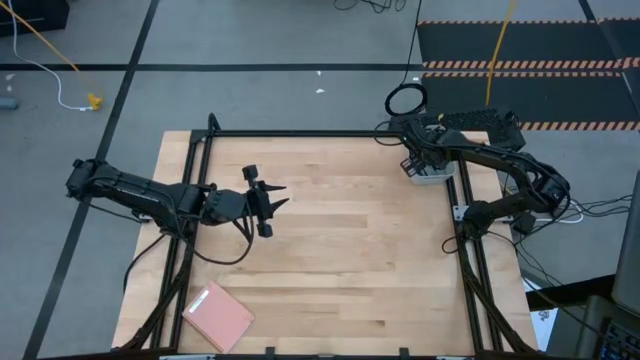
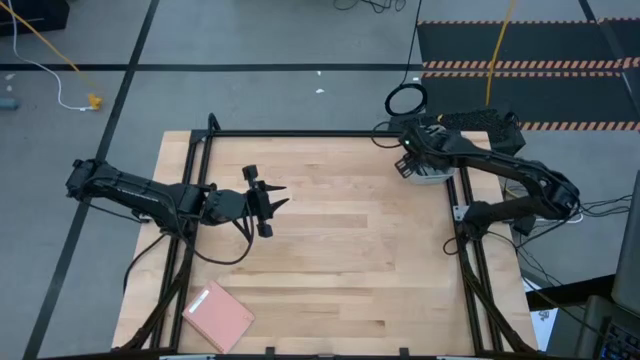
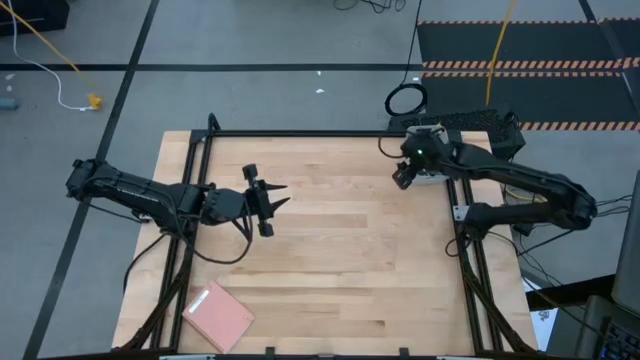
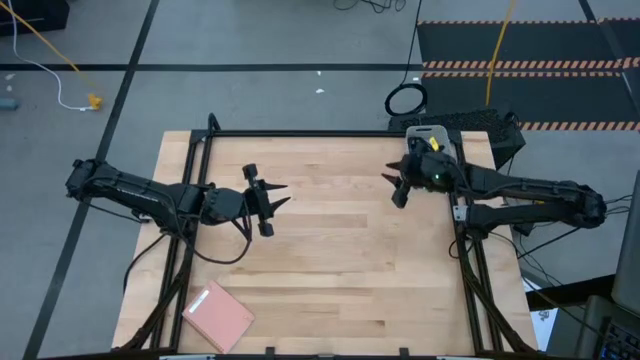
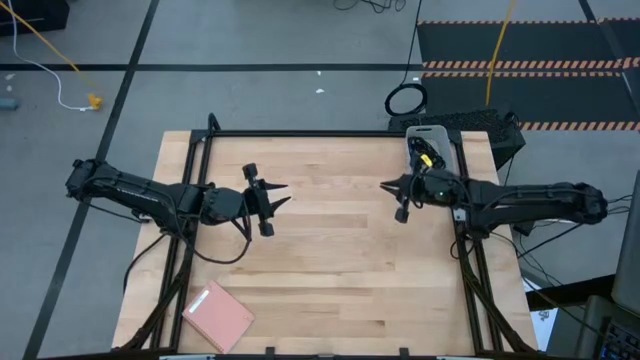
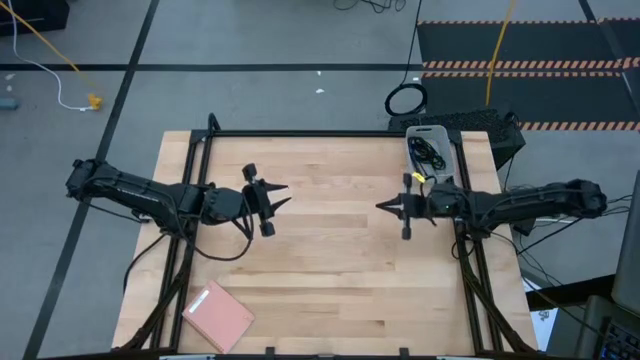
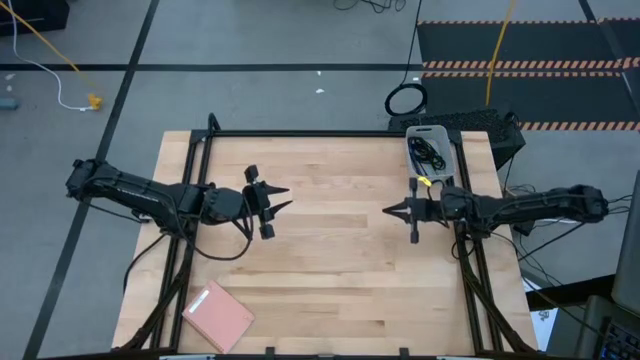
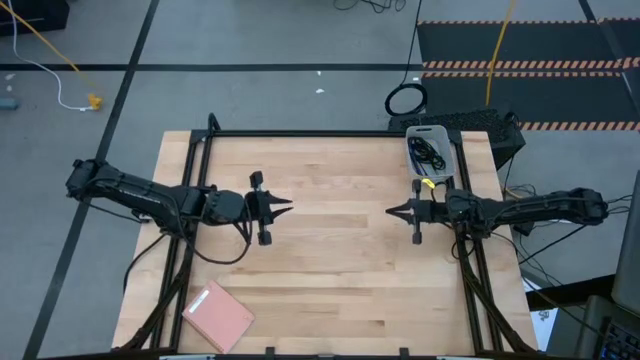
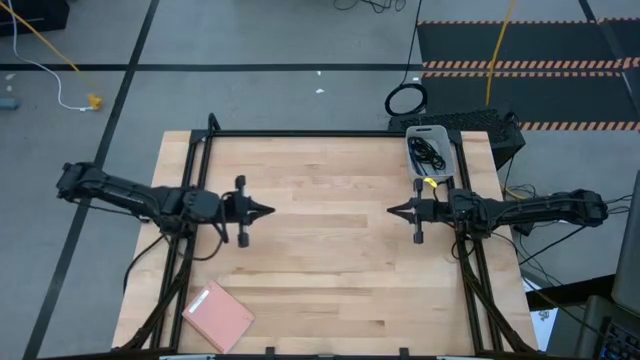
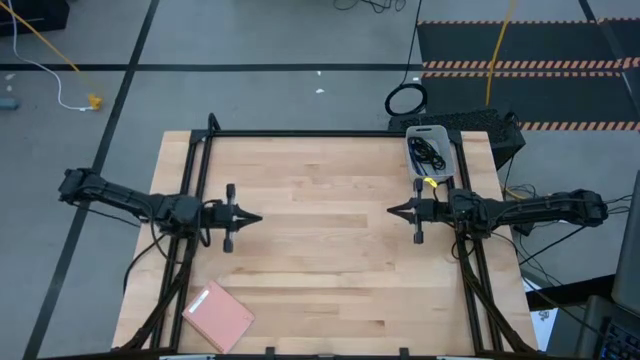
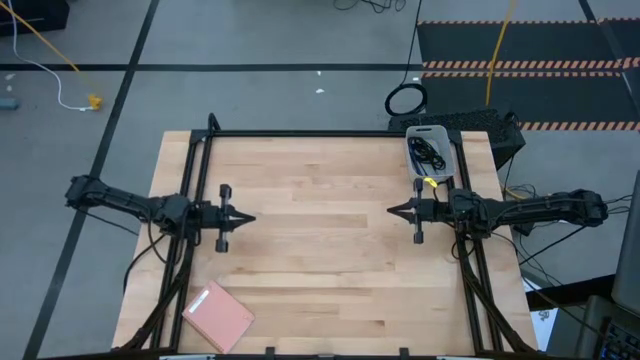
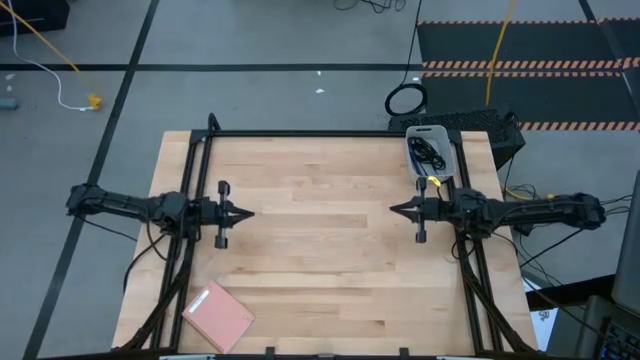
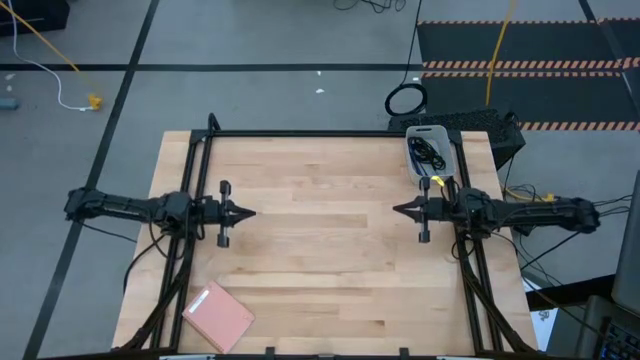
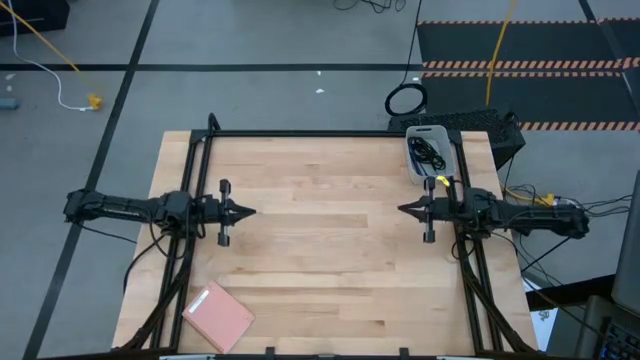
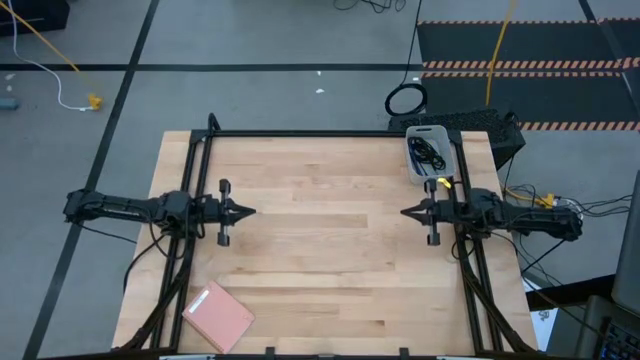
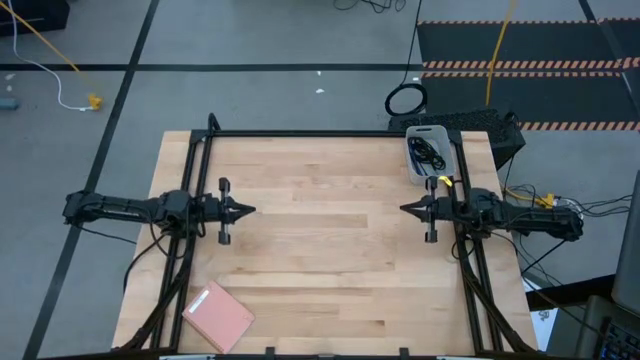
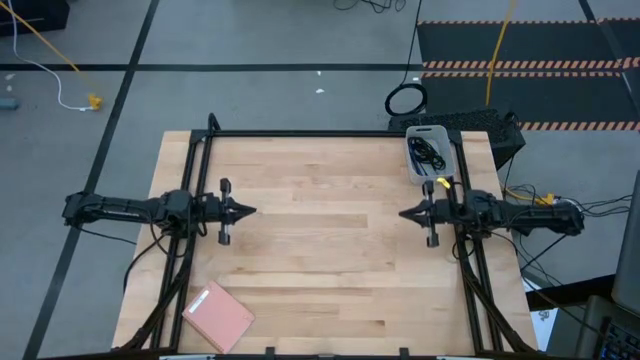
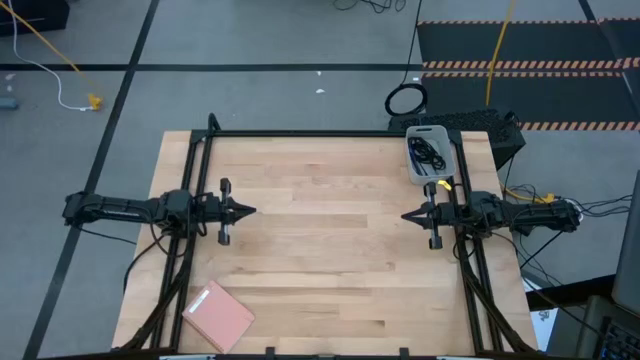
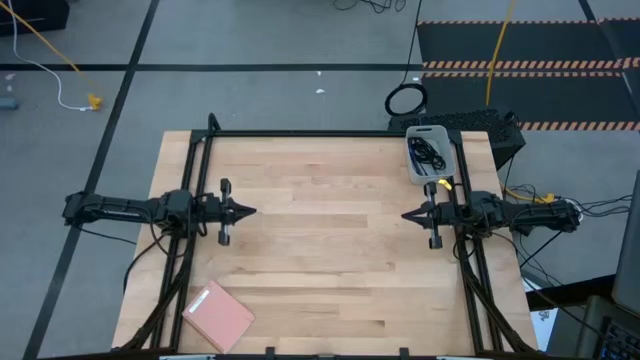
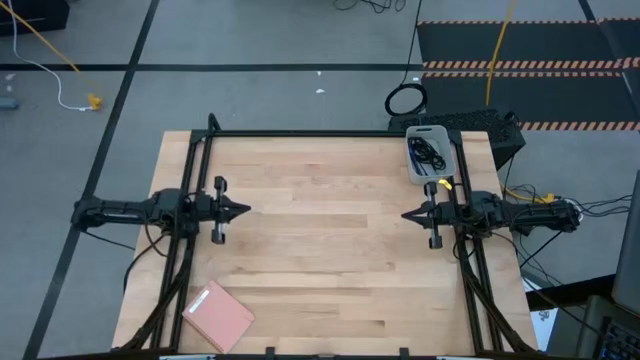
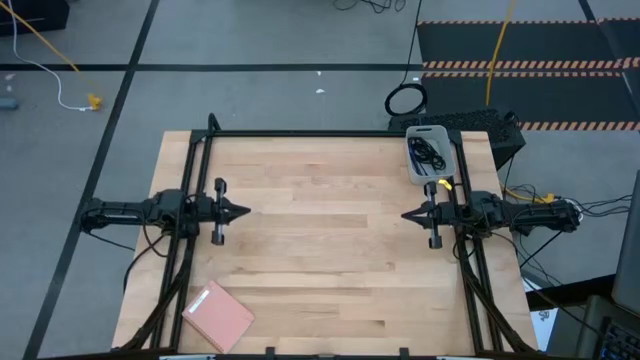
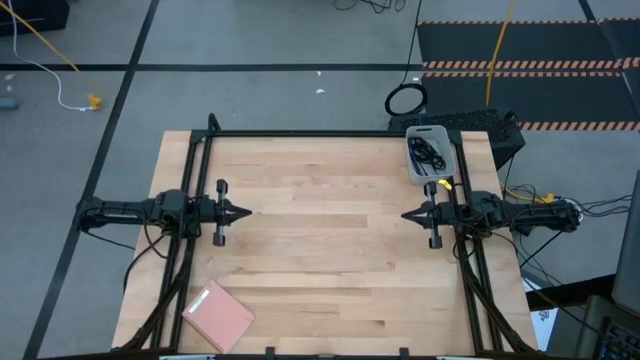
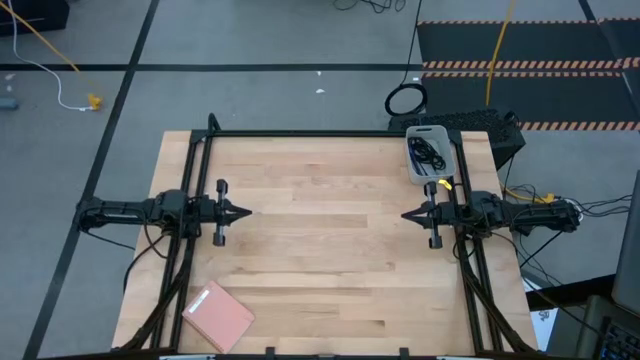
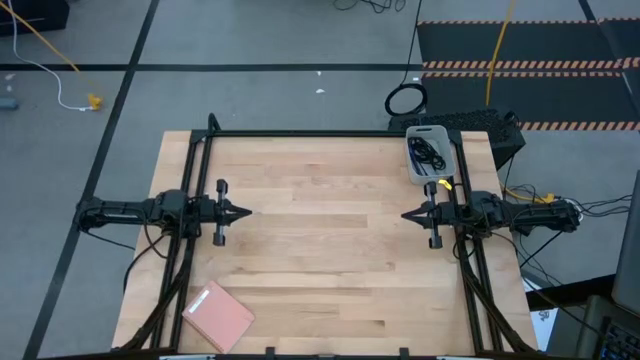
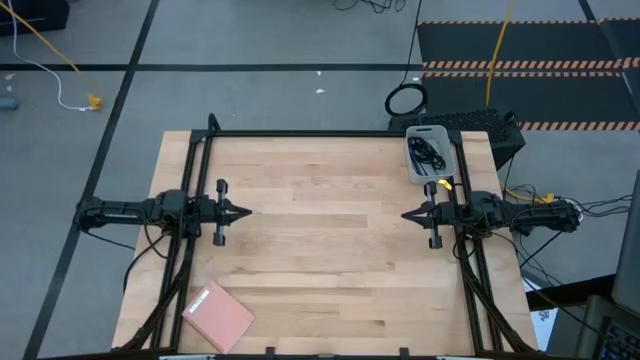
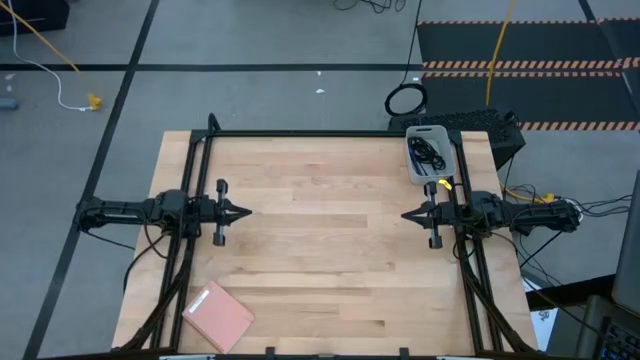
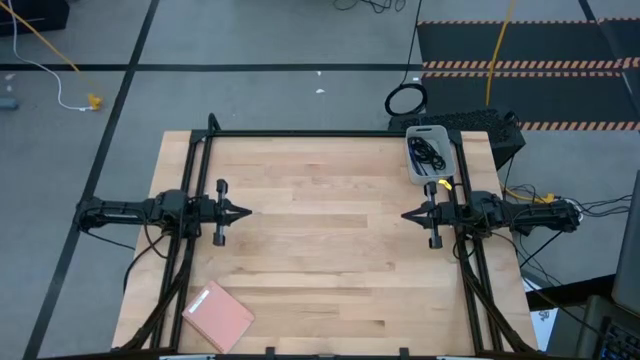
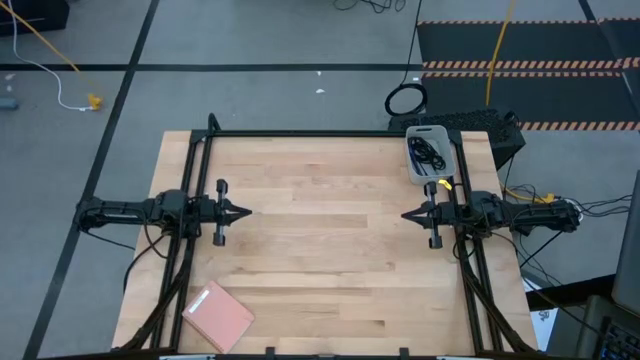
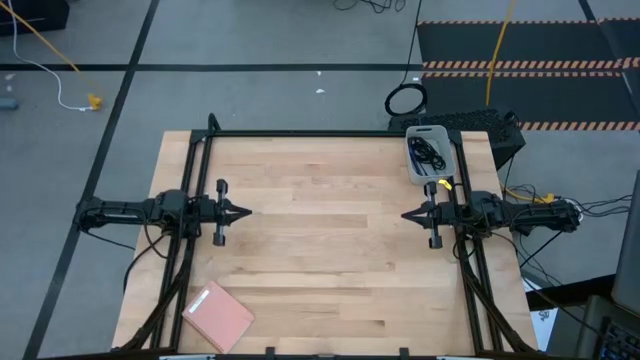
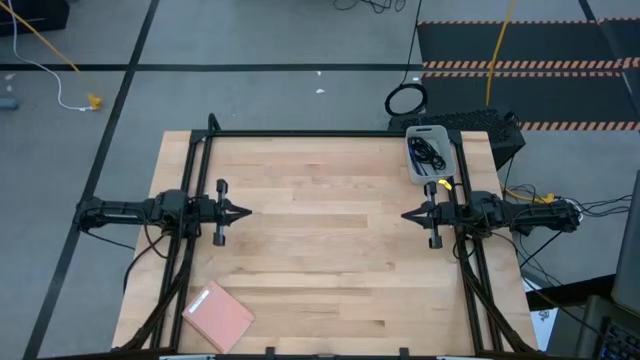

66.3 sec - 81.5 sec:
Task: Pick and place USB-C Cables
Return to Home Position

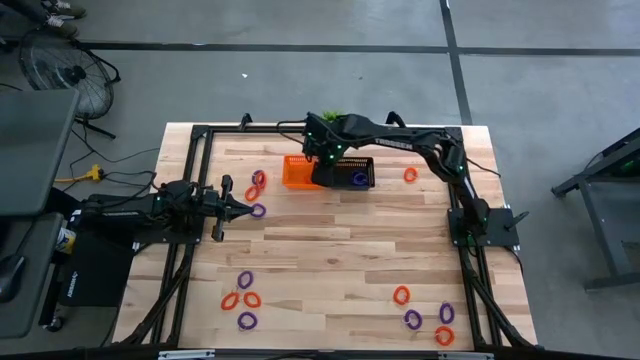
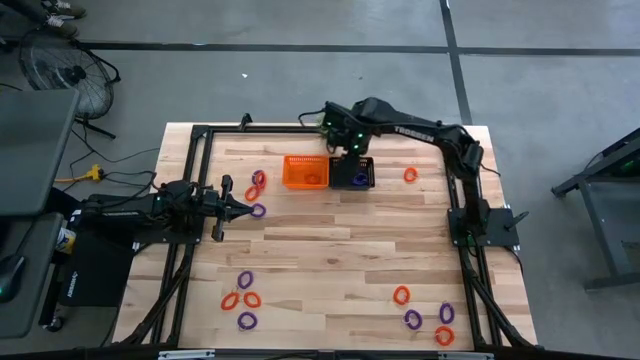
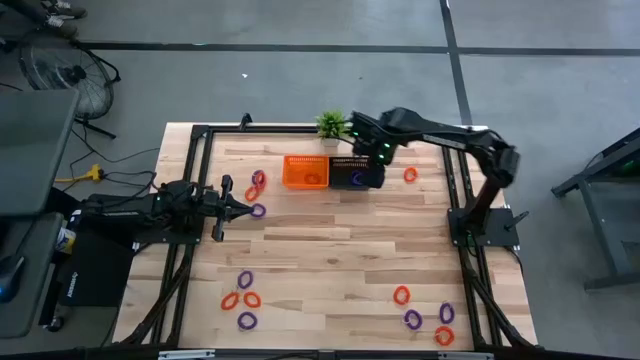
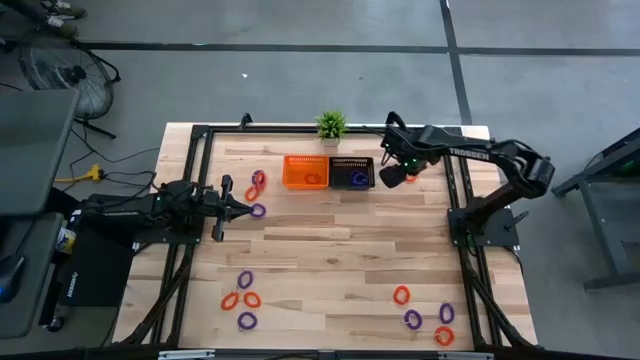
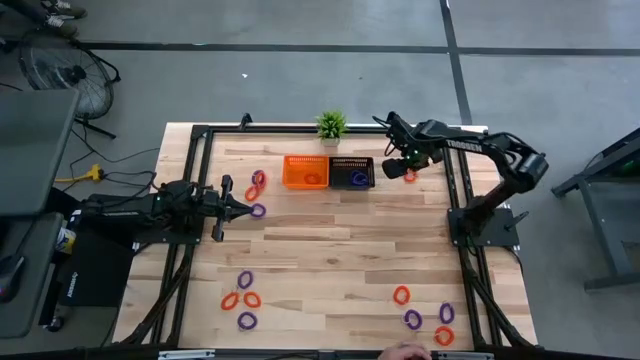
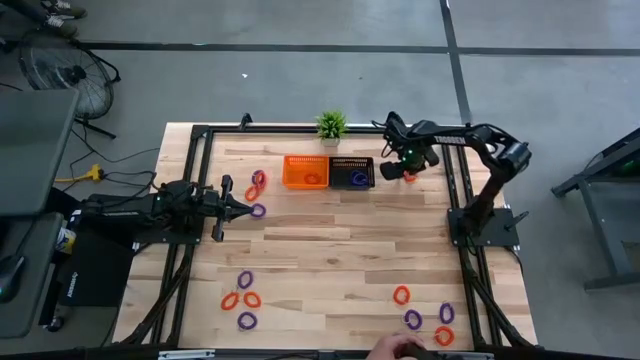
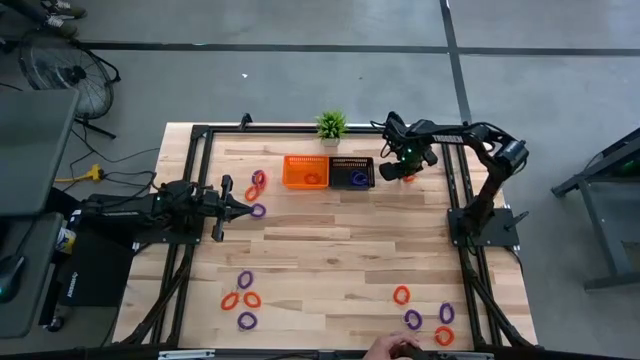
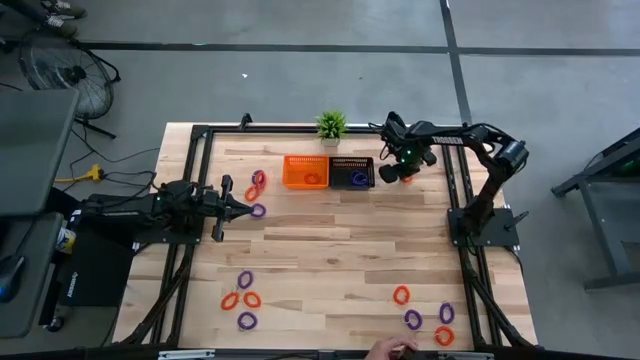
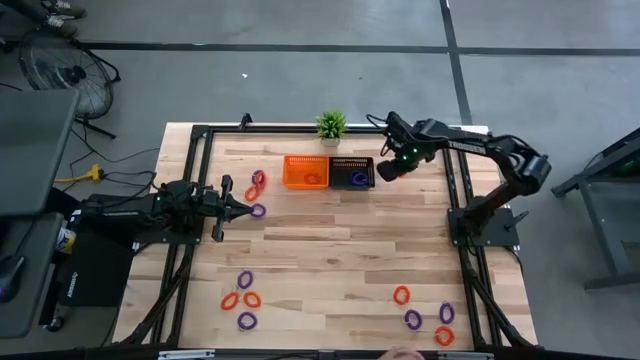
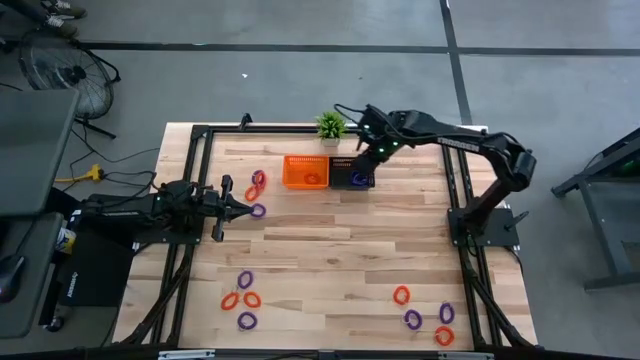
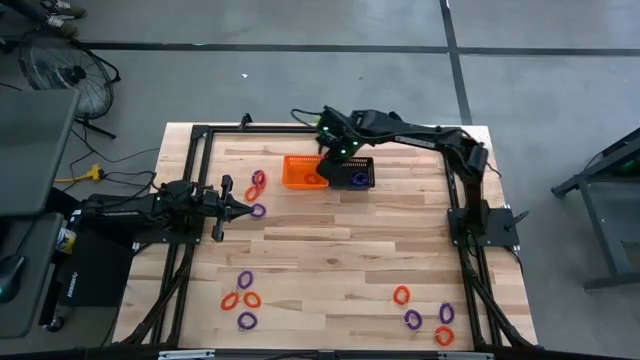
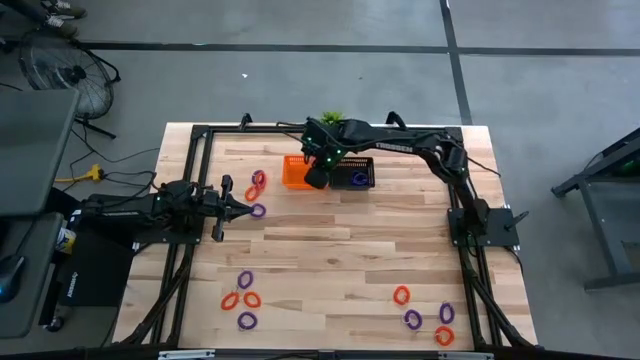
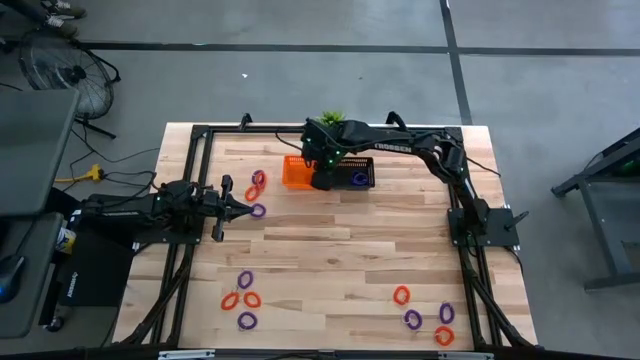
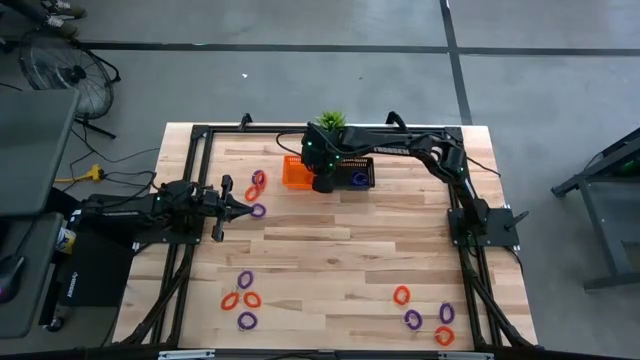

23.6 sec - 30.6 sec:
Task: Sort spring keychains into baskets
Put the orange spring keychain into the orange basket
